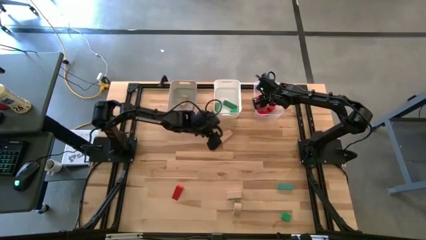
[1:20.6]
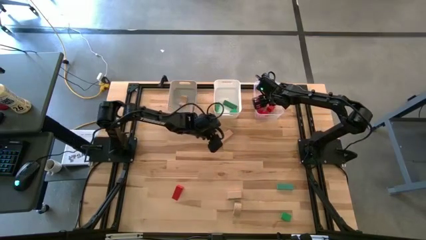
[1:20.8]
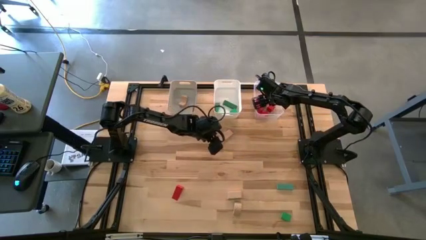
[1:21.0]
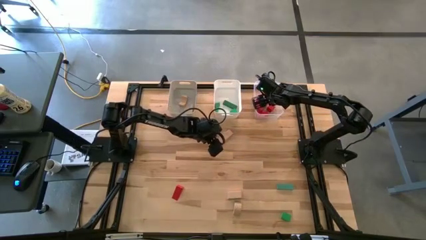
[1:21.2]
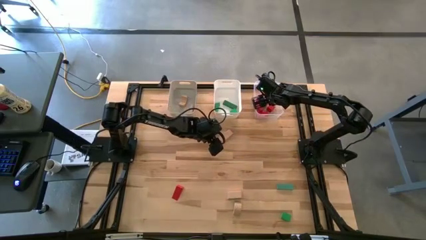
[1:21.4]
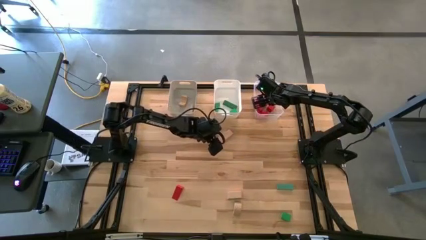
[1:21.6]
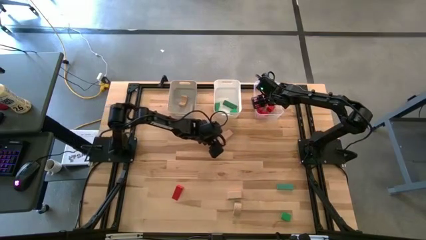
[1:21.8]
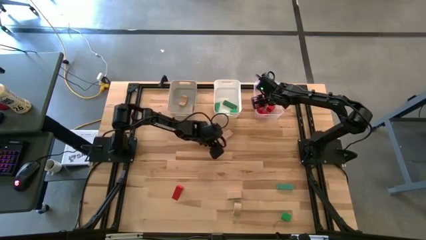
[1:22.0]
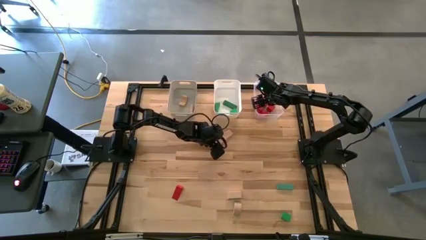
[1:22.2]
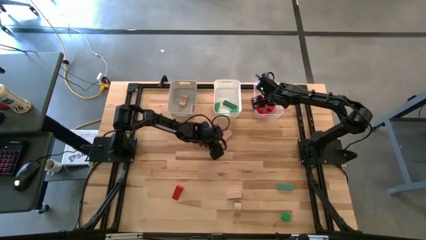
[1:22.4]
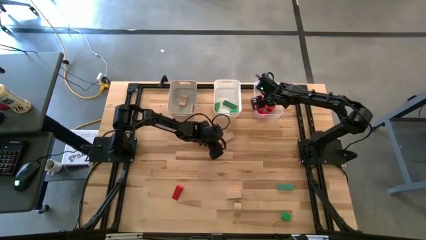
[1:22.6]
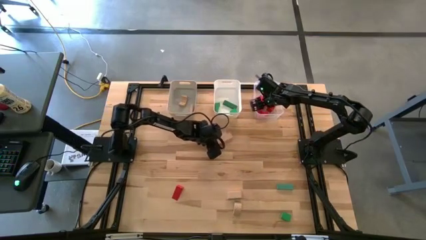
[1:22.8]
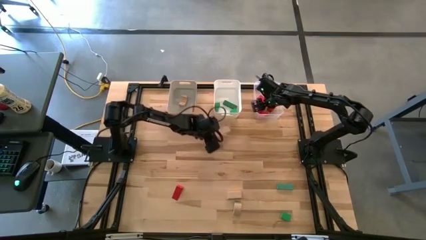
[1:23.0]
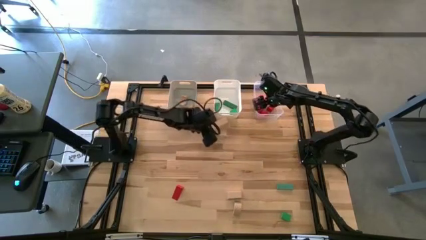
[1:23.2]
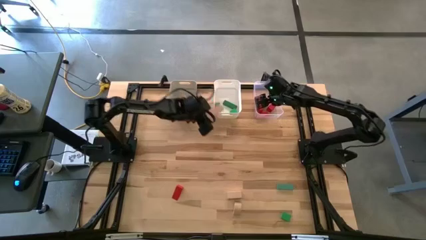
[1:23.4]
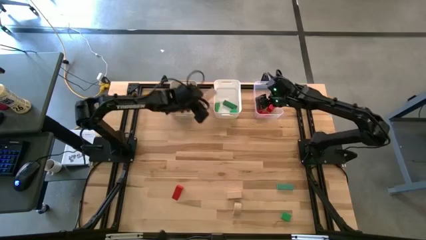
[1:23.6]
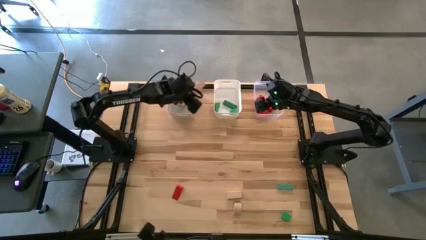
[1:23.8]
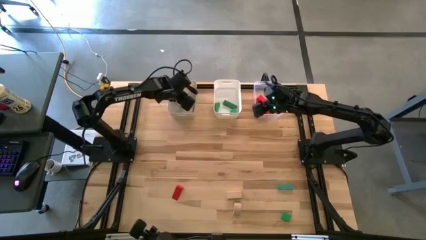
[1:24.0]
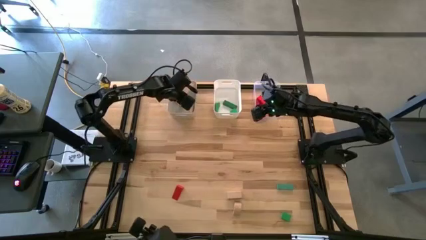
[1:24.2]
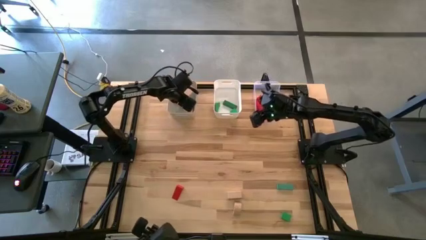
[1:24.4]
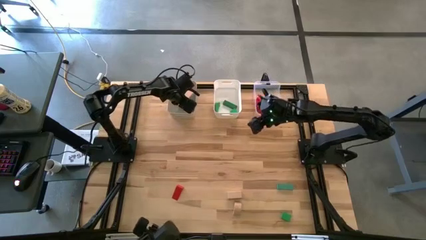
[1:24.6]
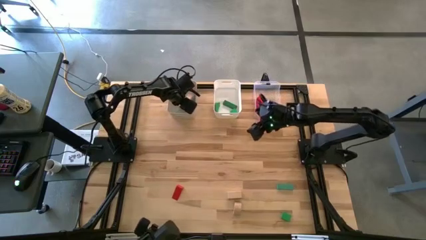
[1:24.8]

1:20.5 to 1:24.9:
Task: Sort & place blocks by color
Put the brown block into the gray bin

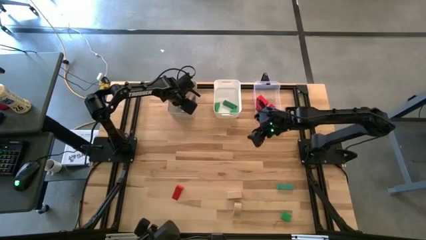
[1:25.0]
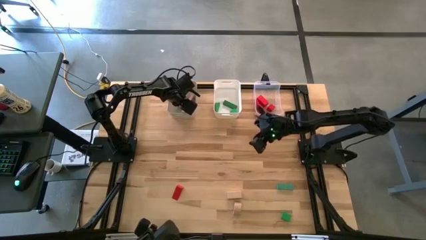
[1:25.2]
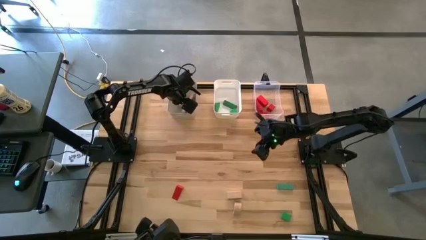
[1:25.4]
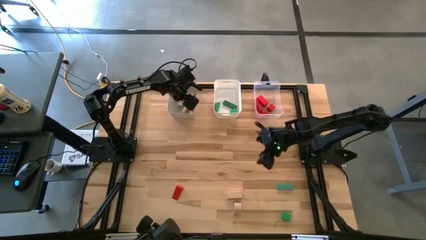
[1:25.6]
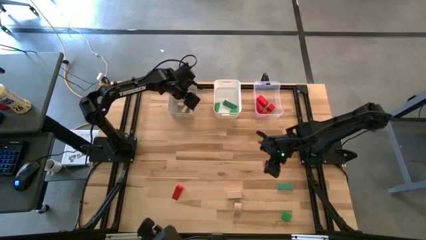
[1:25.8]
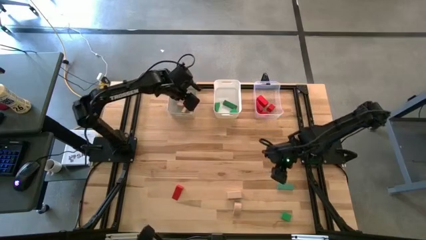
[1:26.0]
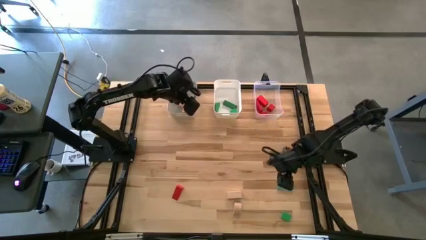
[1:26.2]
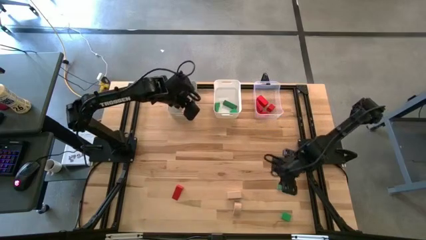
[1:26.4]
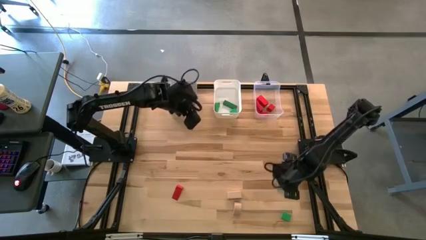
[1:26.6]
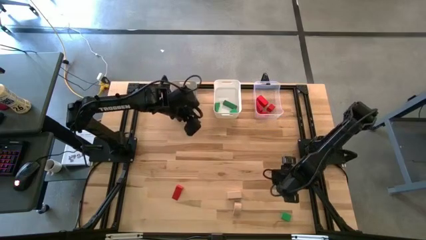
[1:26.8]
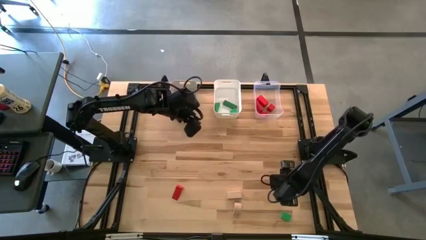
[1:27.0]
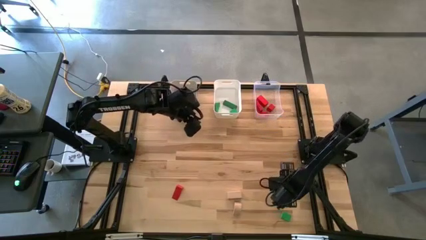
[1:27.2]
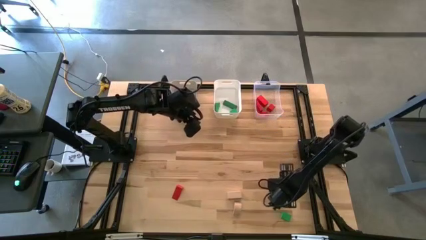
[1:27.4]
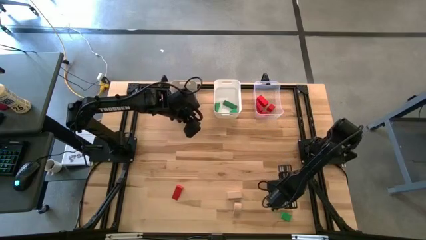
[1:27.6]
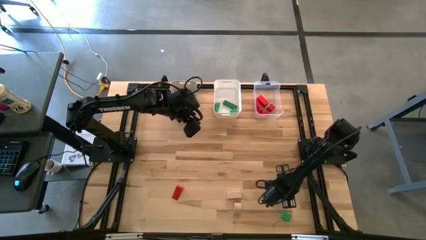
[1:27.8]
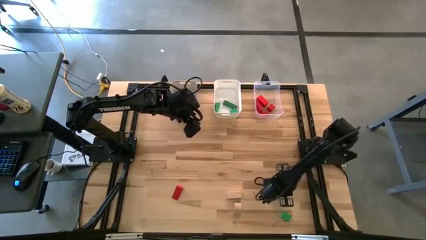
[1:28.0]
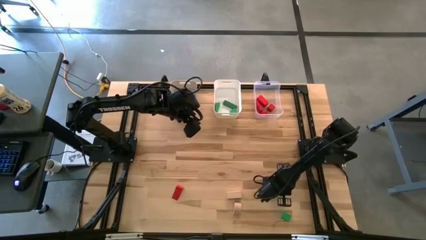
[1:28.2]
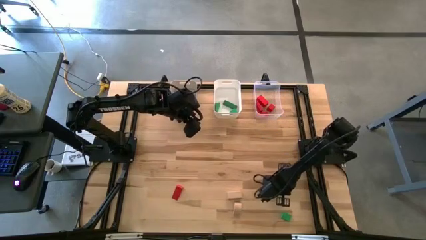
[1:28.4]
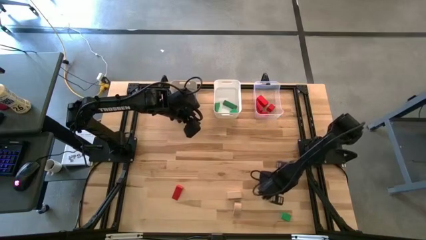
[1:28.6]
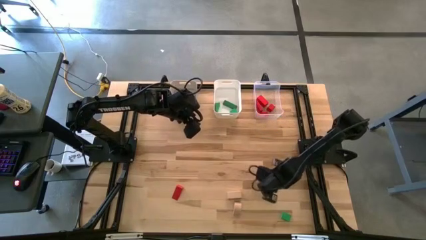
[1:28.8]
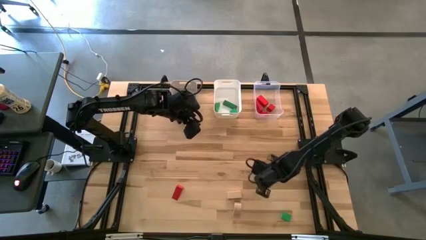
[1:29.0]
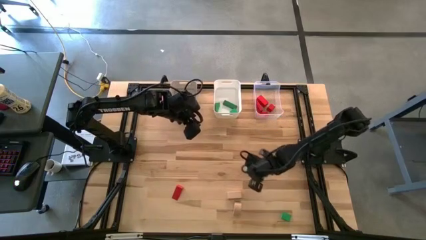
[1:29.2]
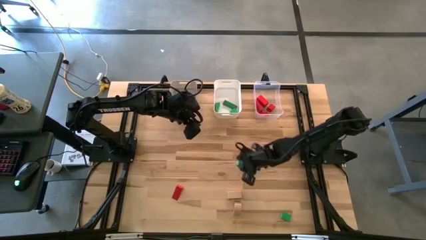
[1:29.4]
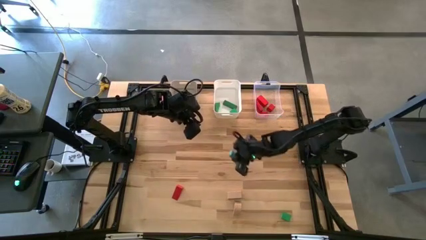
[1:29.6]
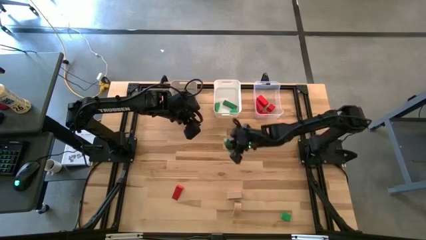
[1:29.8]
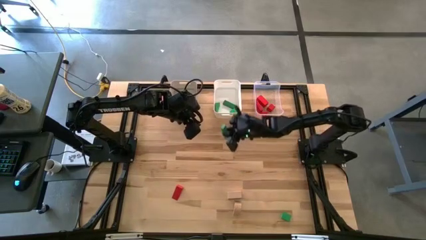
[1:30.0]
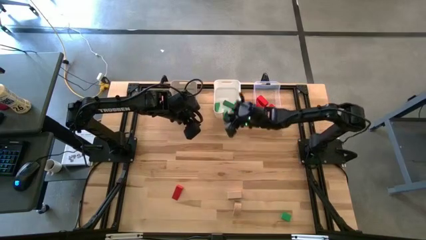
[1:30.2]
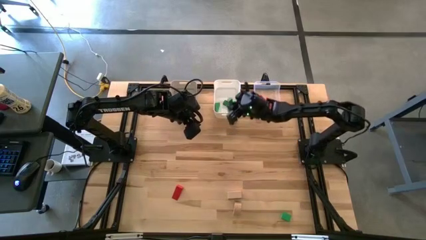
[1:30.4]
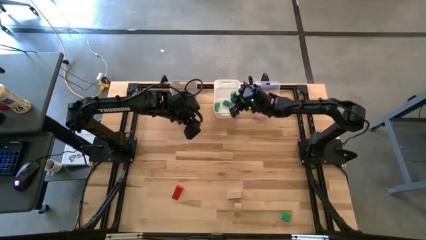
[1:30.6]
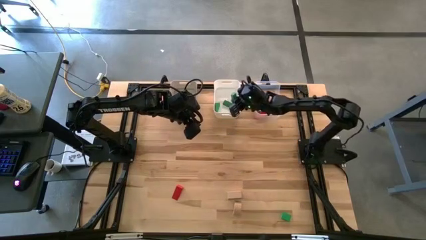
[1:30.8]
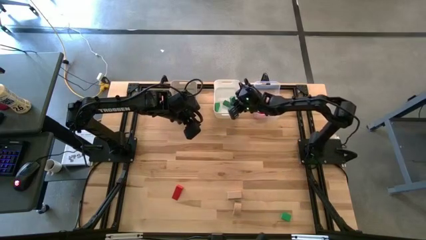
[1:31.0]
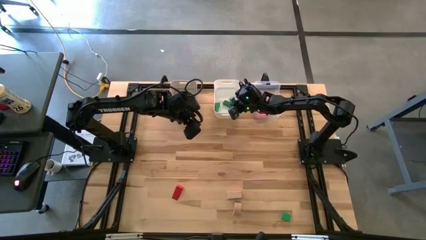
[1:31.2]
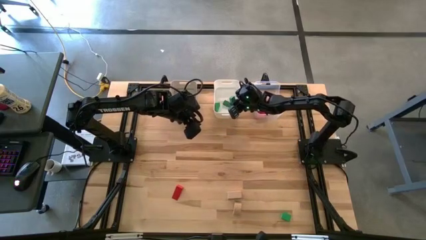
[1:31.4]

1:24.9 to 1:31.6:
Put the green block into the white bin

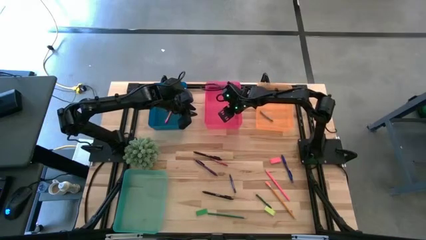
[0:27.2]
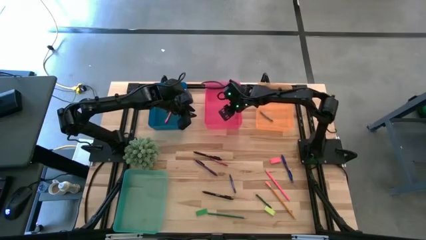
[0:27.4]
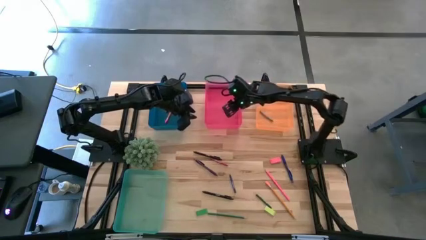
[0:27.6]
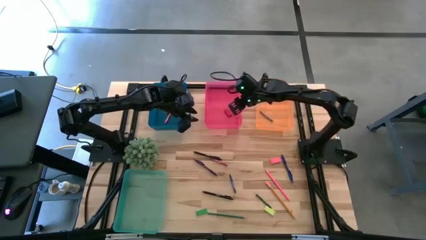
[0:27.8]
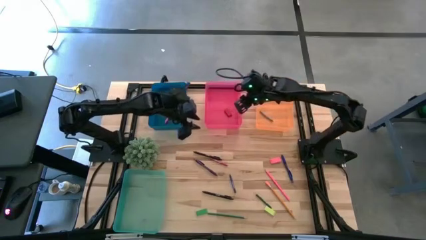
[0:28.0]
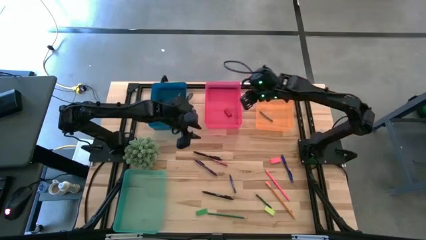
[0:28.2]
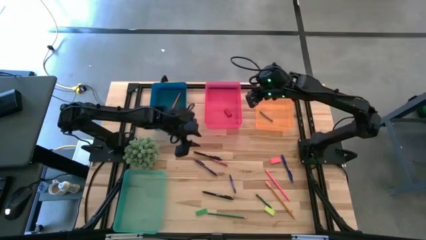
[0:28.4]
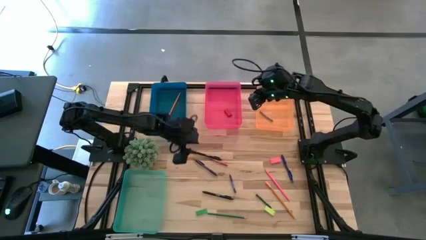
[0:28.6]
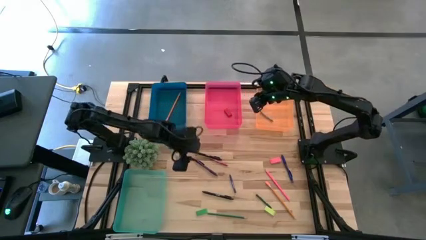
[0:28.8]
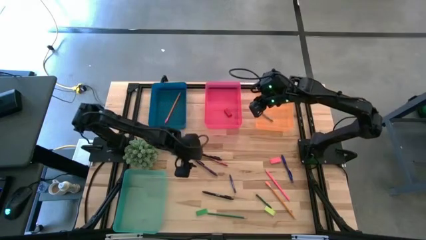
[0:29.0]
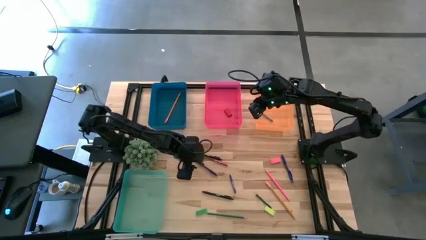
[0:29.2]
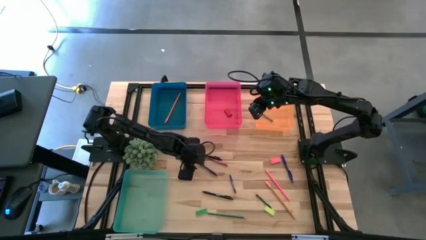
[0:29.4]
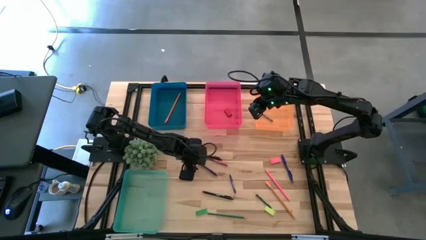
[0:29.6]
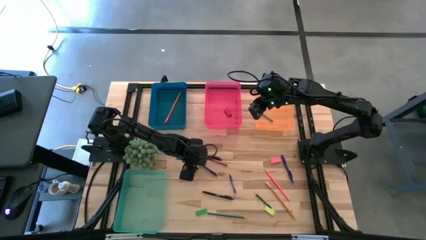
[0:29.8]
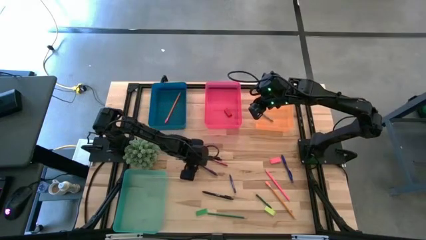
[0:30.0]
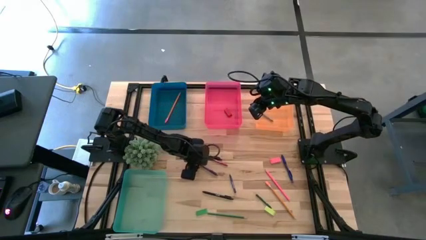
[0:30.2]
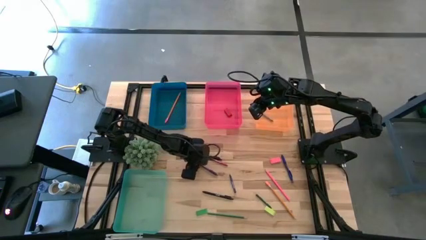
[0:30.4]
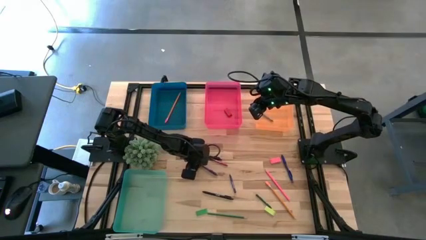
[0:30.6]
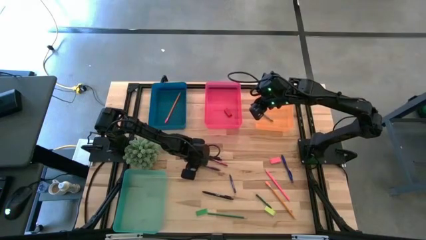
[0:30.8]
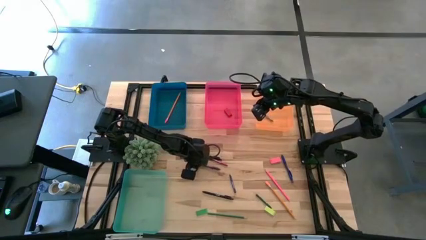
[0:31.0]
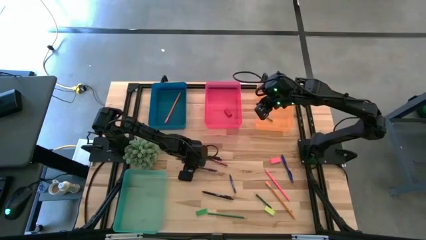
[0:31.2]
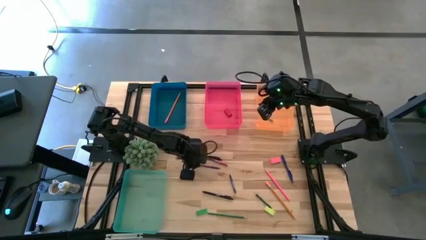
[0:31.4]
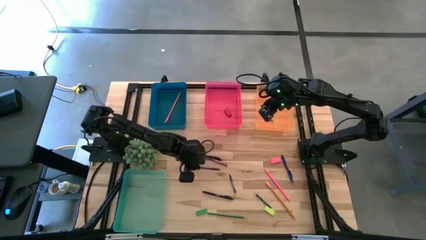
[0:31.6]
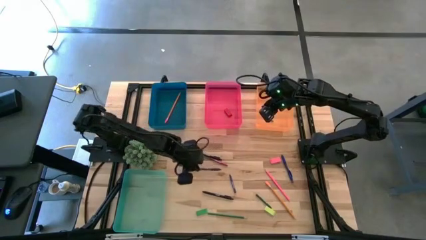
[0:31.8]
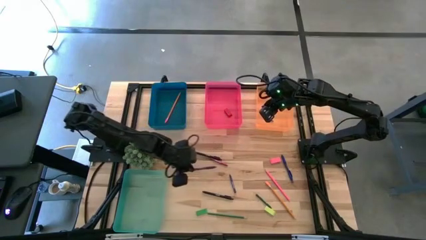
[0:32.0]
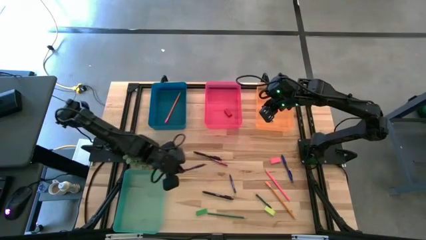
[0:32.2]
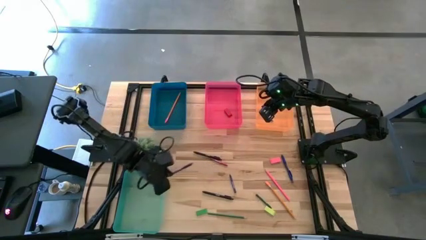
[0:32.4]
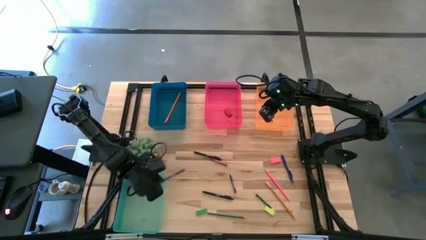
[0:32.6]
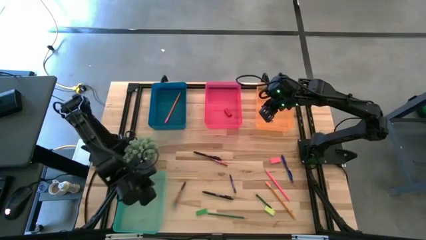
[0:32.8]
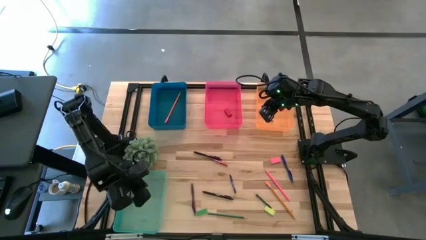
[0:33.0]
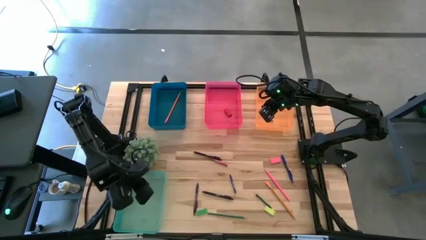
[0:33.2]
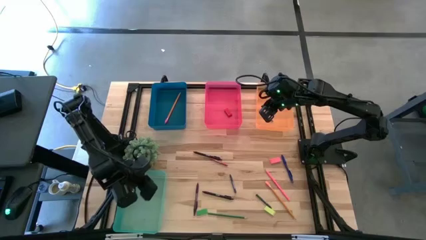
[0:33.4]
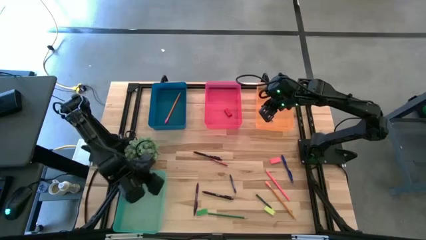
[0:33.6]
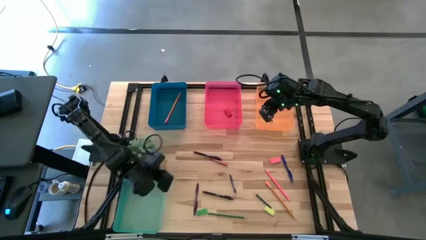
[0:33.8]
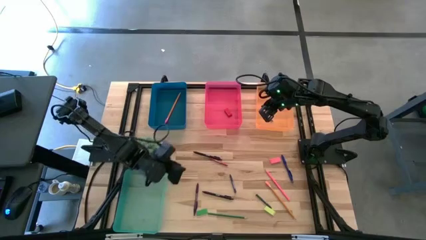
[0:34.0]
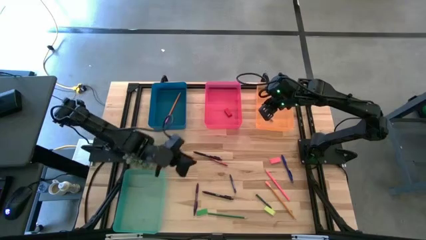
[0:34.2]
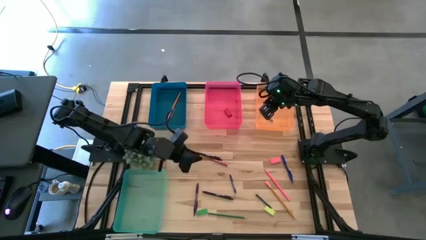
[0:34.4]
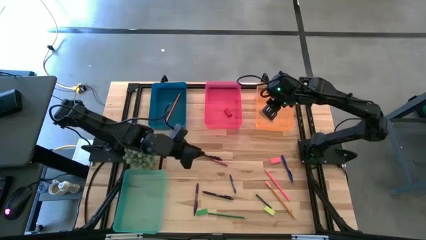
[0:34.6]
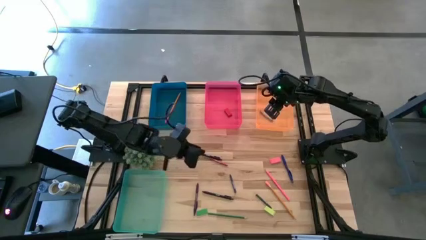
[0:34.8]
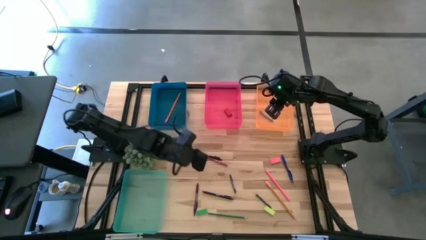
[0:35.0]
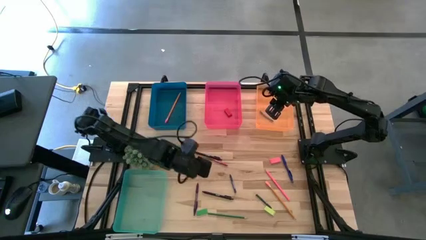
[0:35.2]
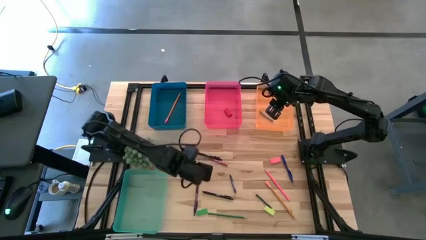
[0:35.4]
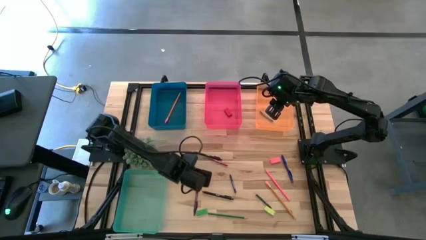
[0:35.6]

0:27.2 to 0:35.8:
Task: Sort crayons/erasers/pens/pencils in bins
Put the violet pen into the green bin
